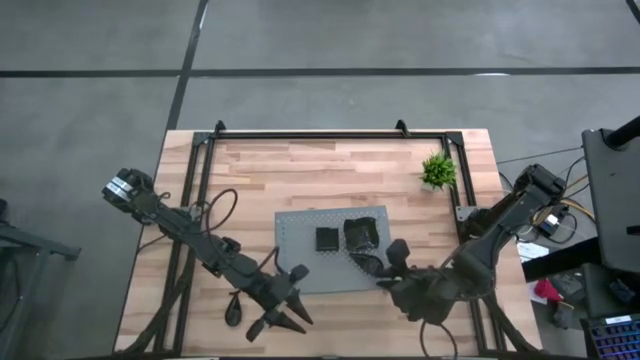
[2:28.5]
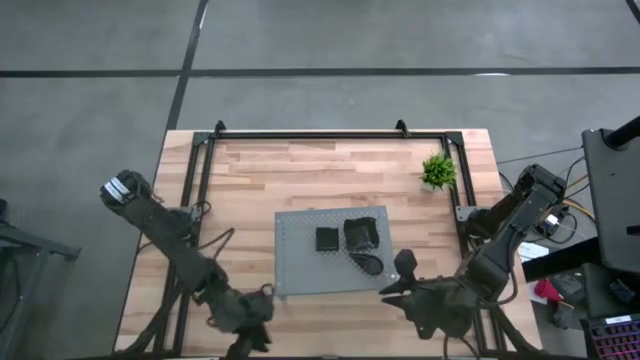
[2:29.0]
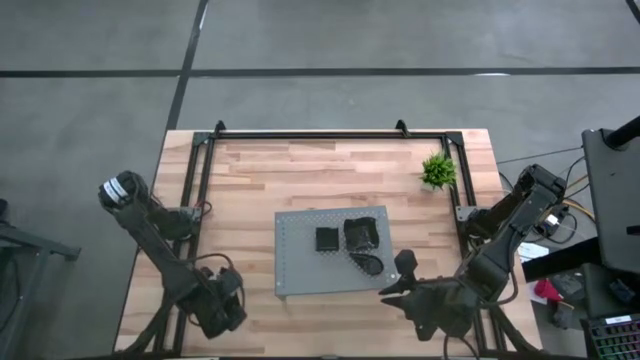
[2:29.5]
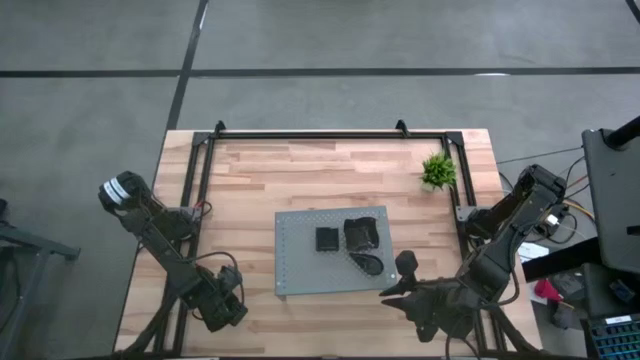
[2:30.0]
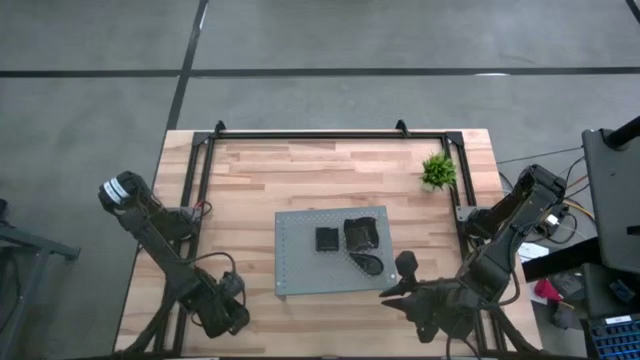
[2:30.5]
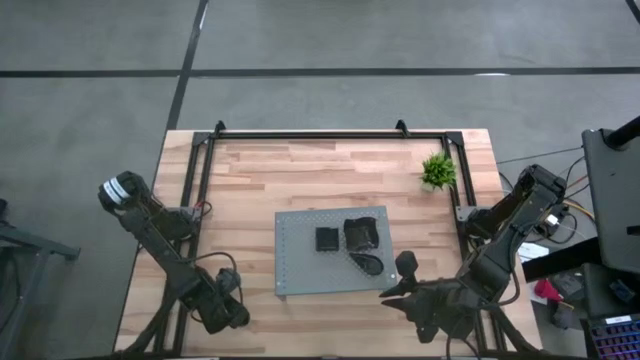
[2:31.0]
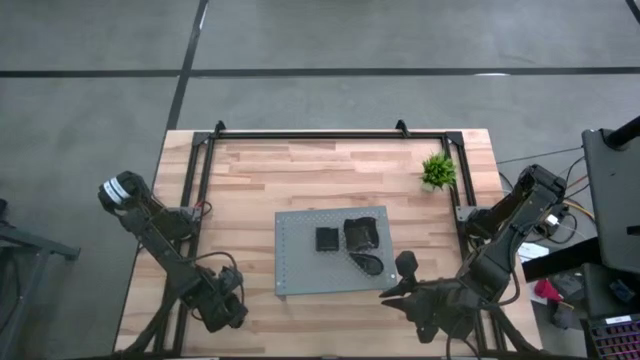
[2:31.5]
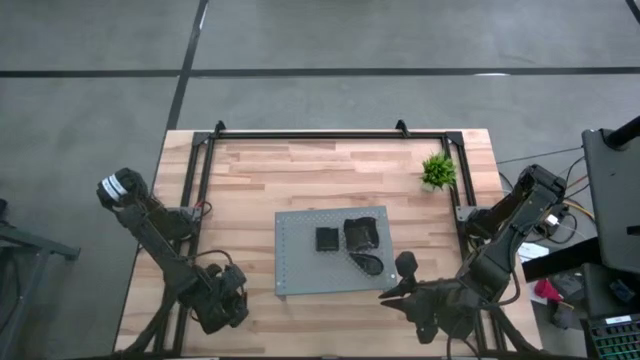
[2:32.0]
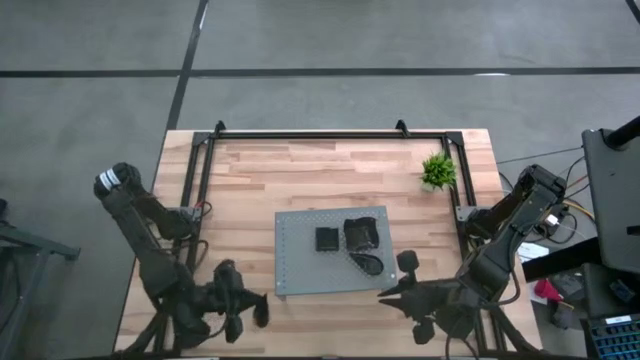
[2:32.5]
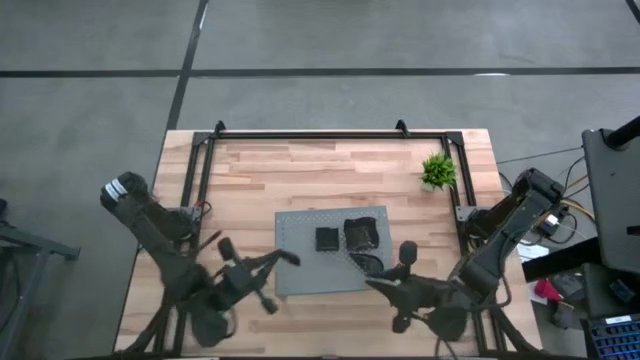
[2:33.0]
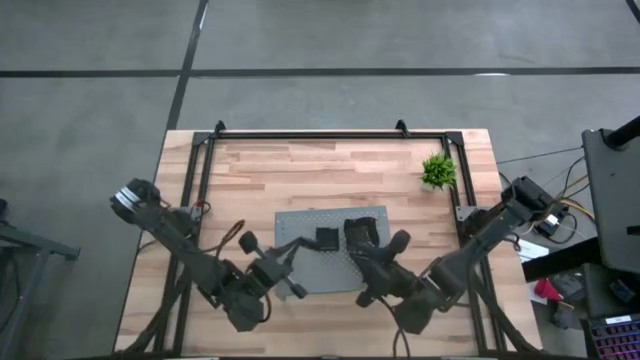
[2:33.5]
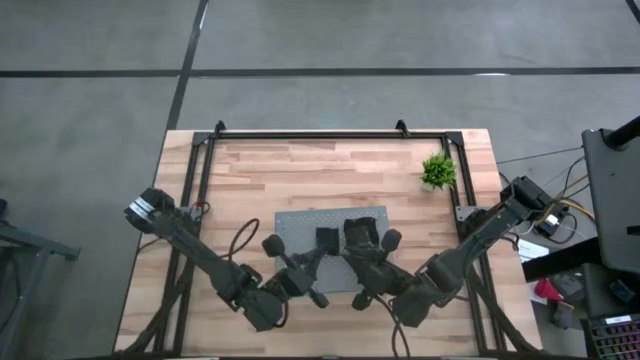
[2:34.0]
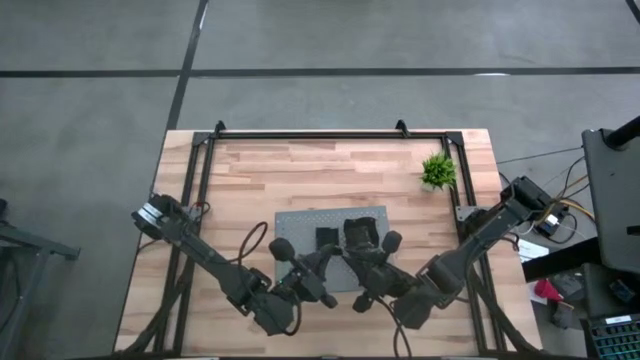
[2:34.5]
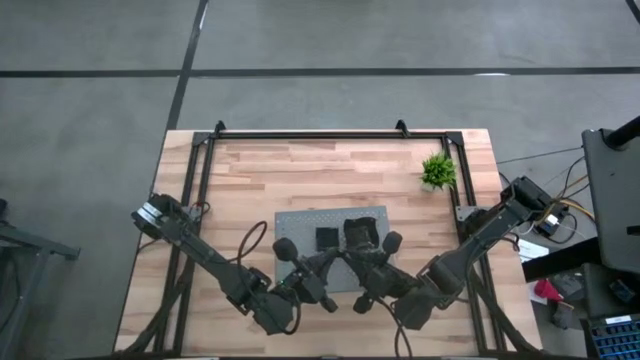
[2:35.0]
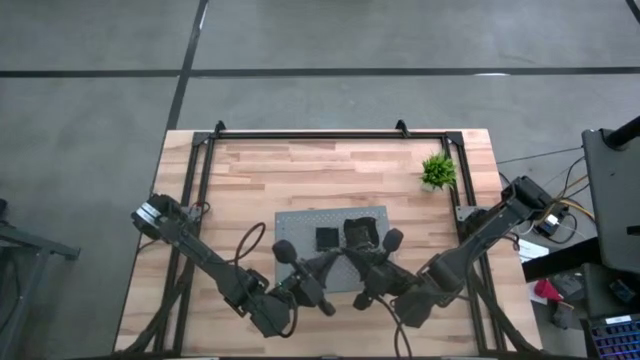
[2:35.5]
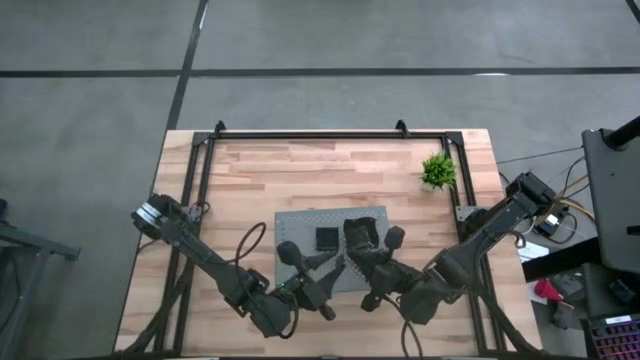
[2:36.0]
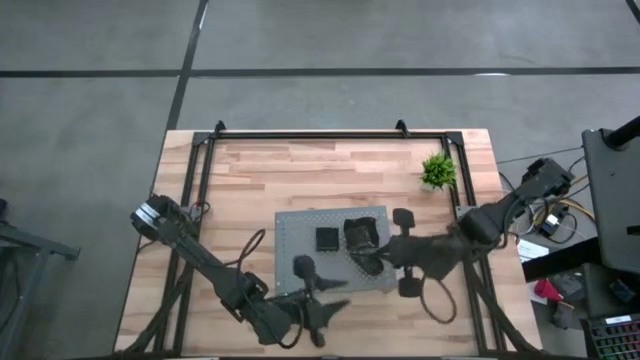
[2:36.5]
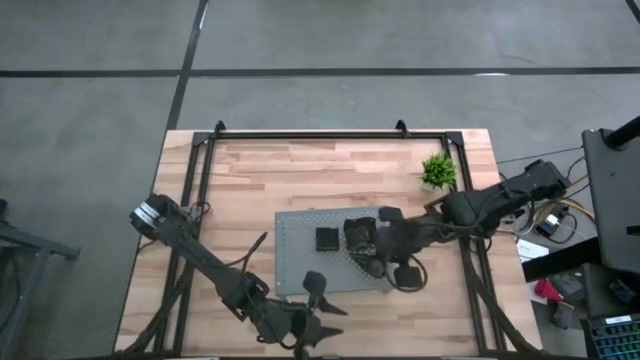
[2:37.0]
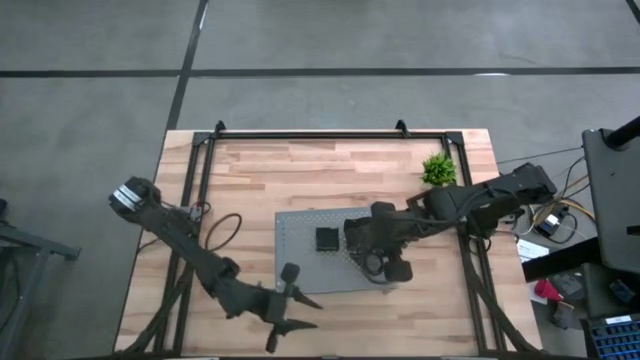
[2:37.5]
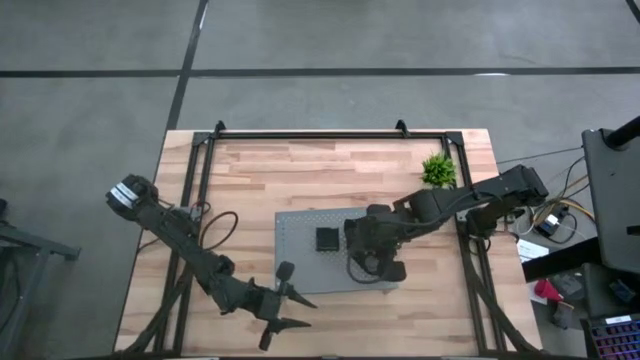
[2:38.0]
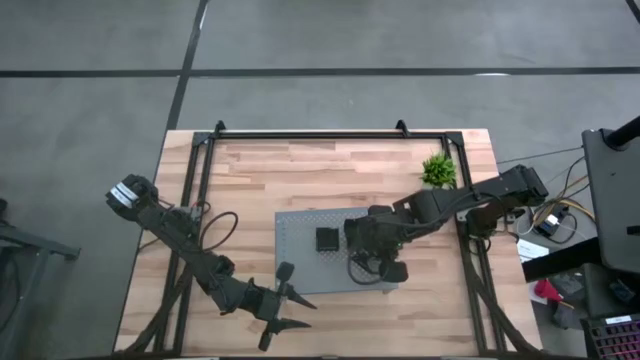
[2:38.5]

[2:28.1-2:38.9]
Task: Pick & Place Mini shaped plates
Stack the drop shaped plate on top of the drop shaped plate on the shelf

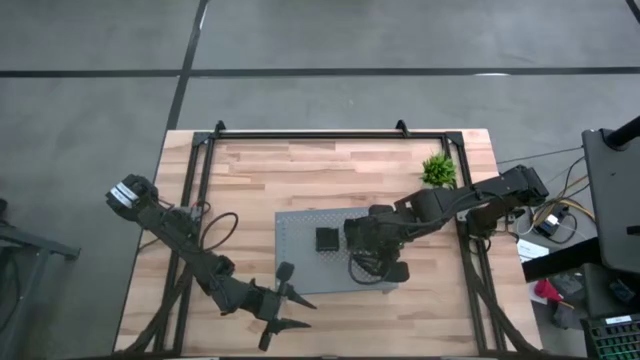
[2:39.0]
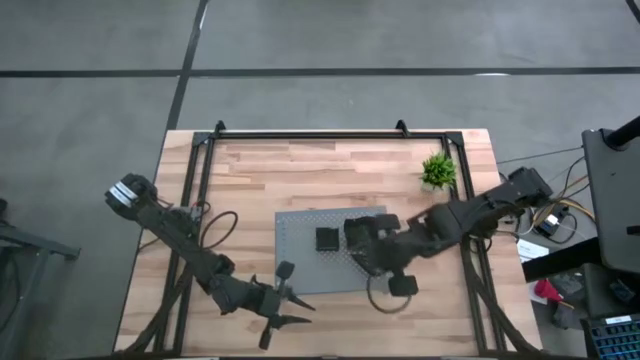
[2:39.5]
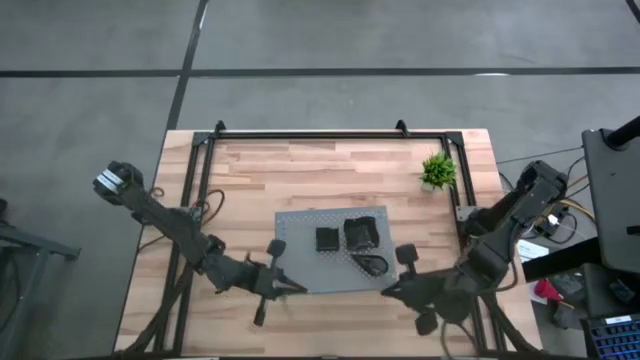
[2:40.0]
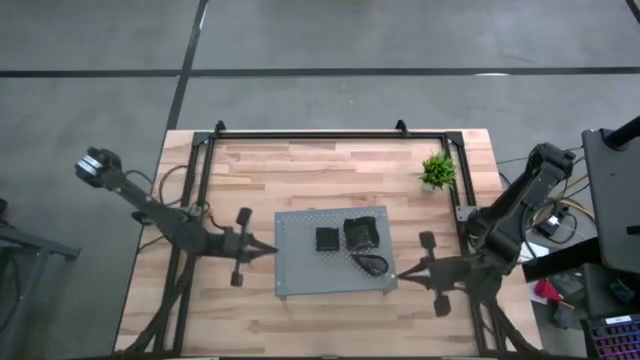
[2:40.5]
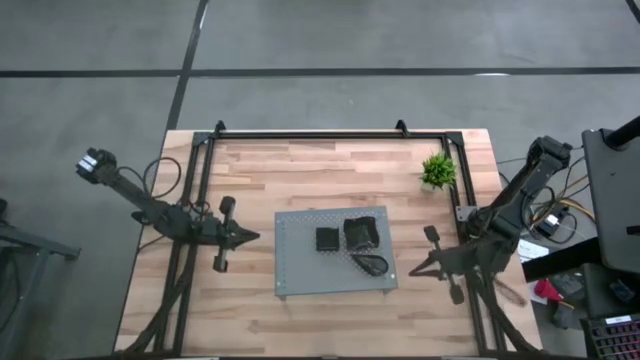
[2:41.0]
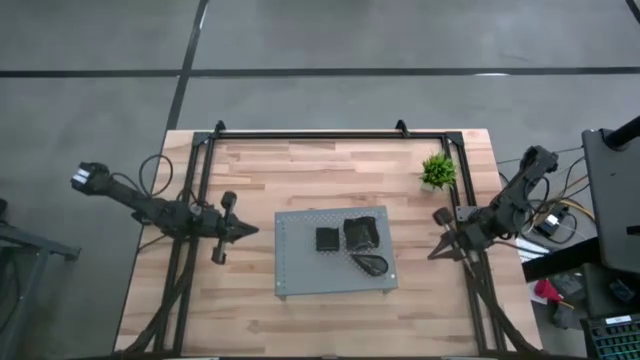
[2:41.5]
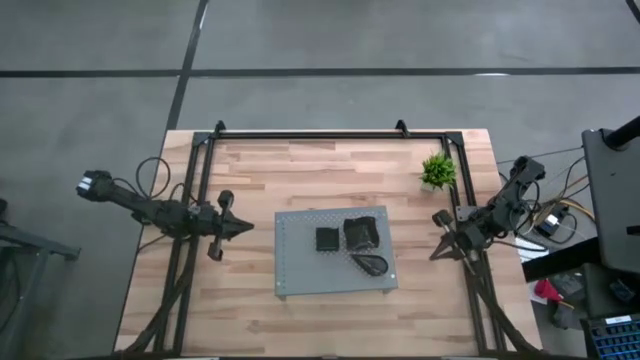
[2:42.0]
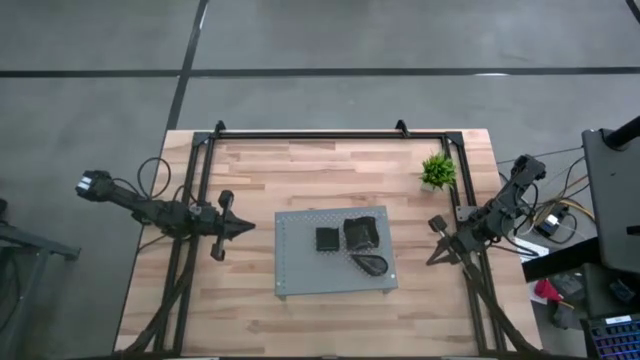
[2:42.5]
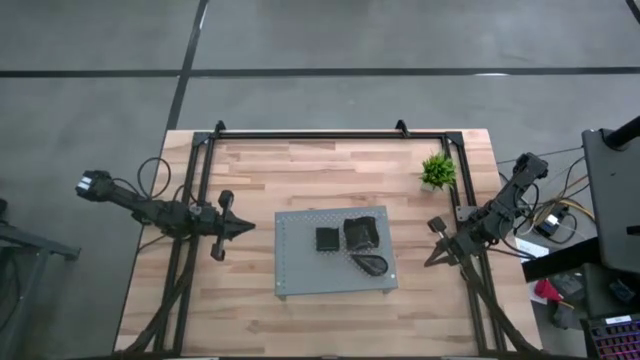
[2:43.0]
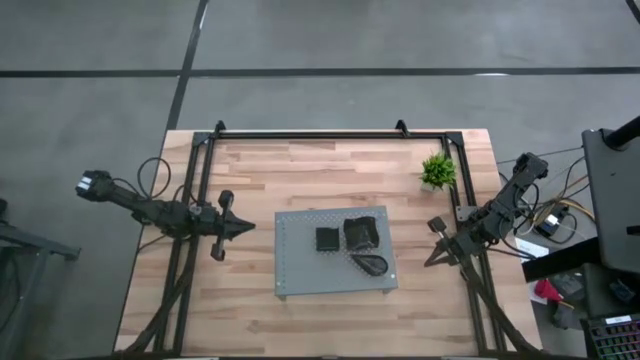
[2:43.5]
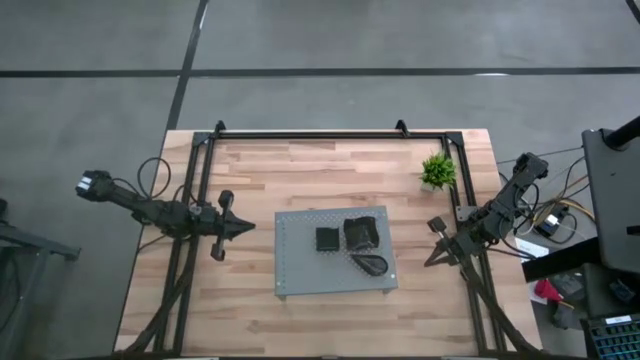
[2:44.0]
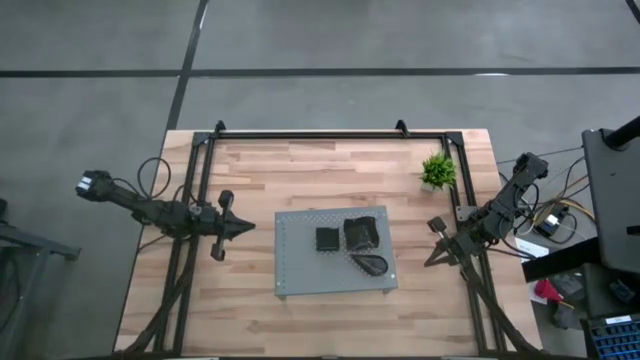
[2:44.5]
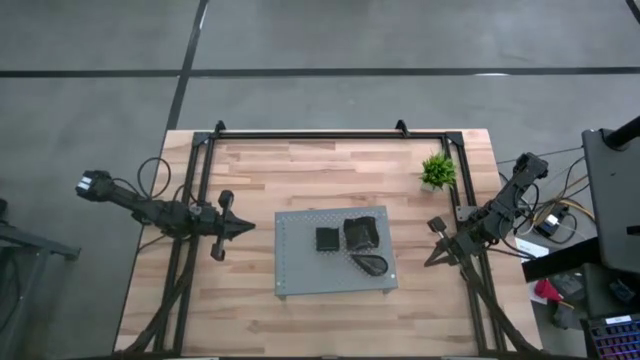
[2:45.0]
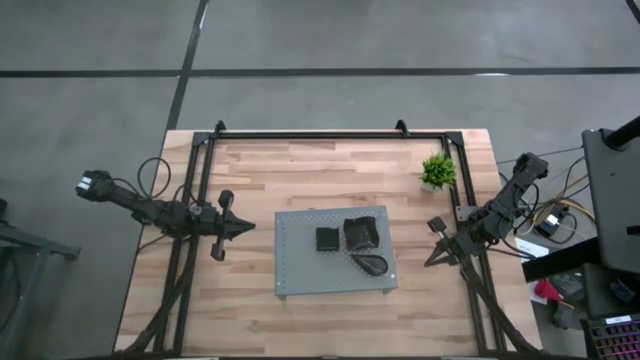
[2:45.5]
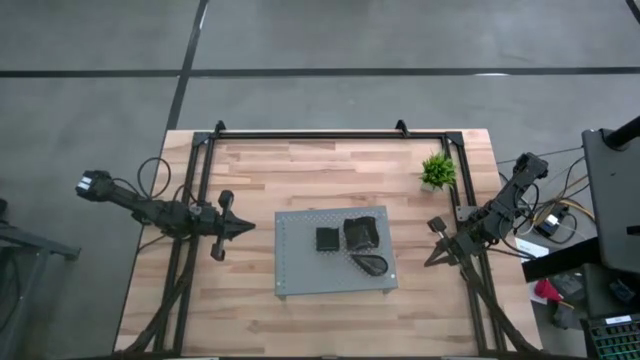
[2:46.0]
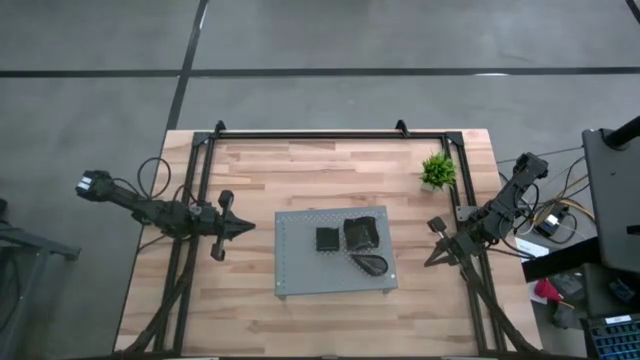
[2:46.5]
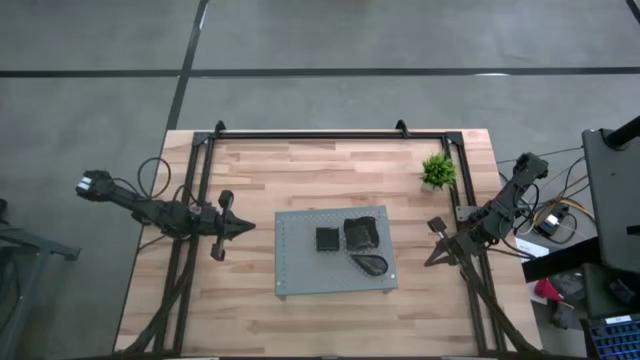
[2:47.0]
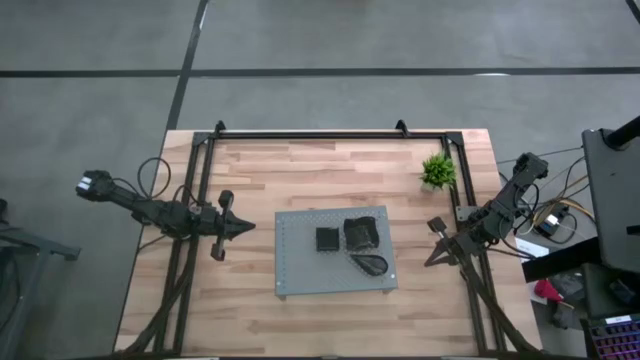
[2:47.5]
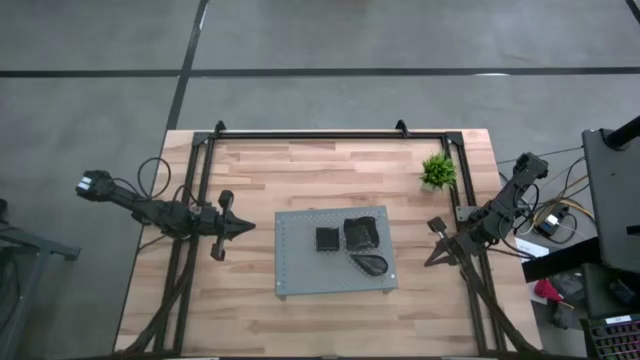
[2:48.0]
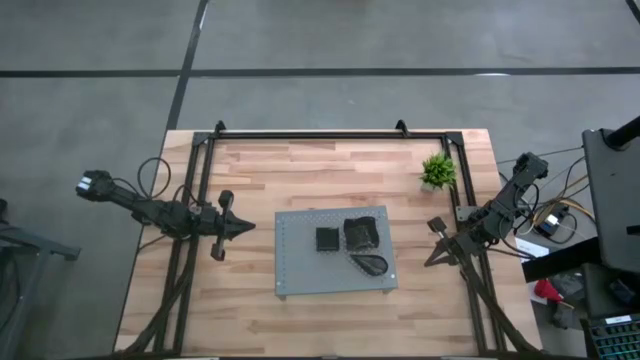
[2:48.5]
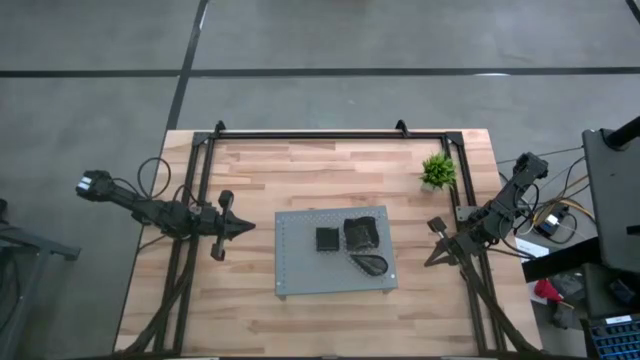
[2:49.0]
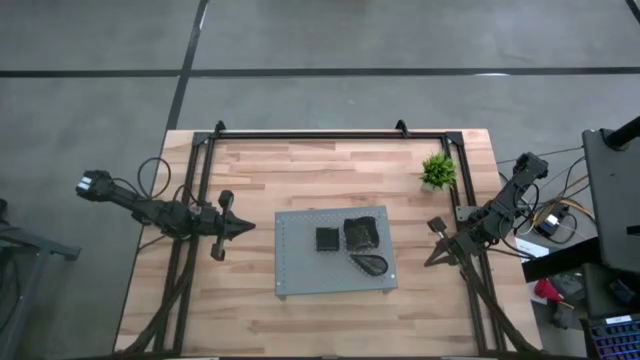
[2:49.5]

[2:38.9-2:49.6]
Return to Home Position
